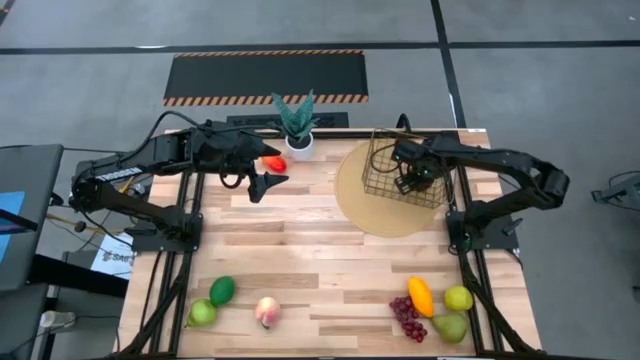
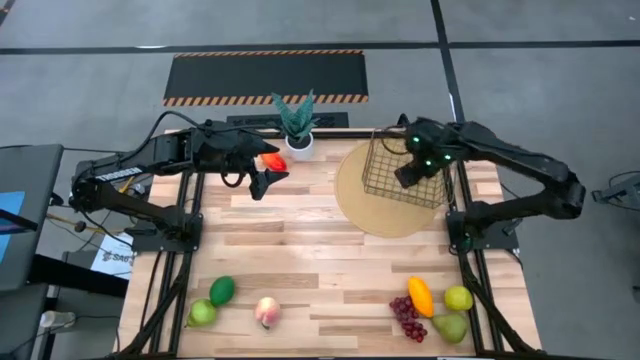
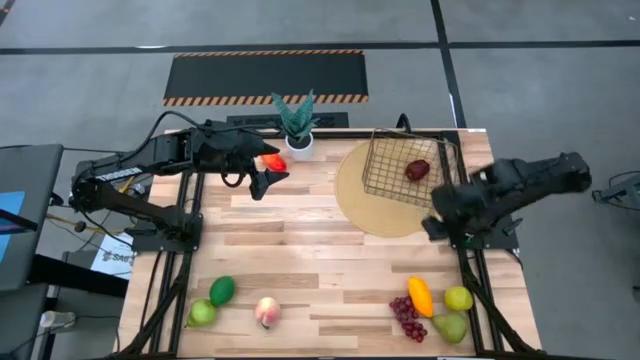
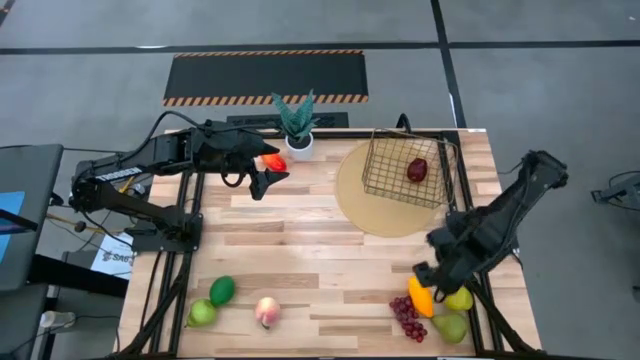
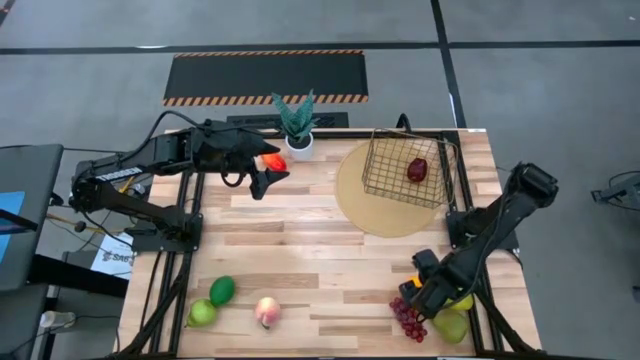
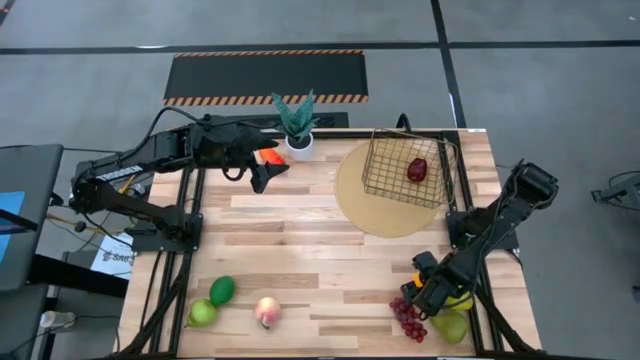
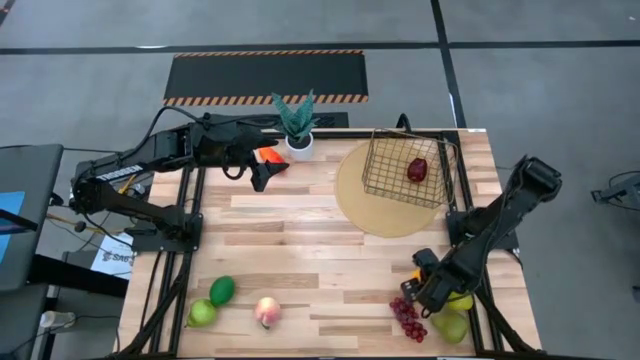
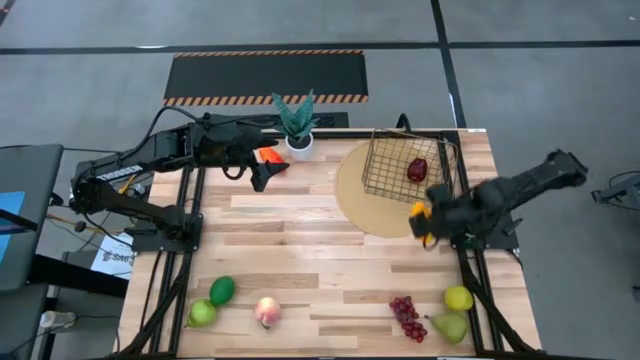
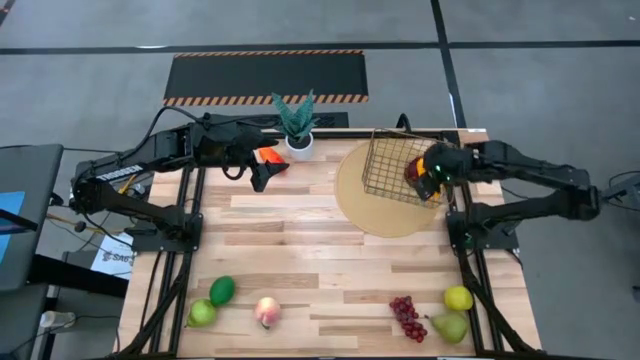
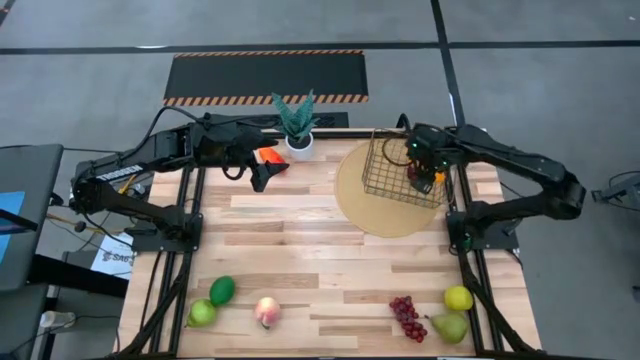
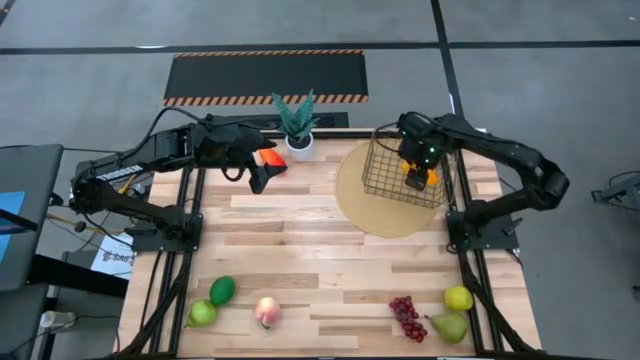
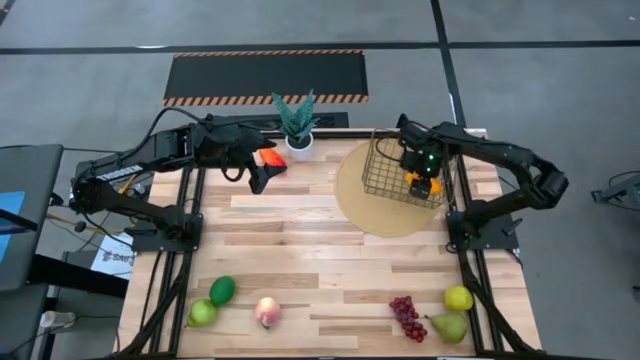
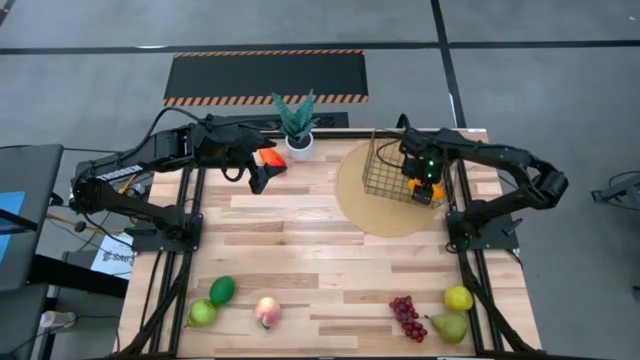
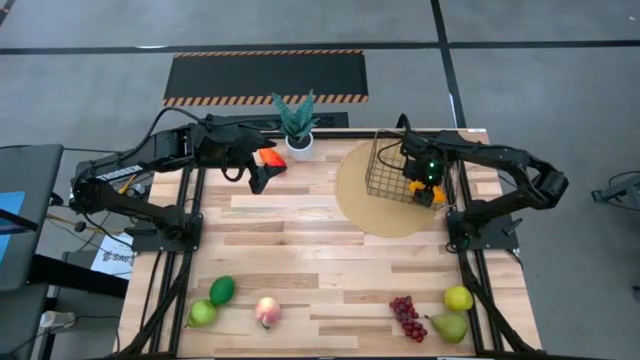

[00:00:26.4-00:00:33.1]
Task: Build produce basket
Put the yellow mango into the wire basket

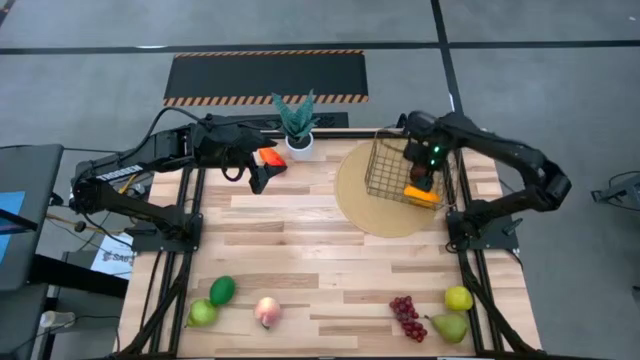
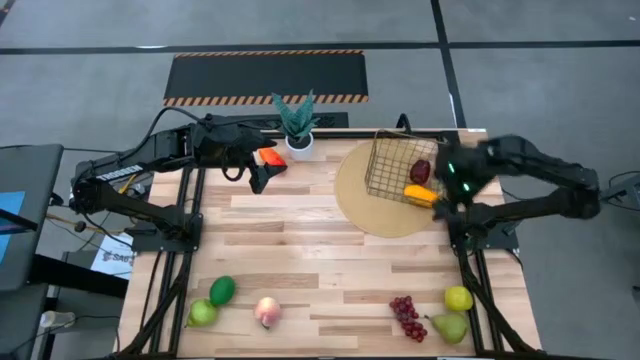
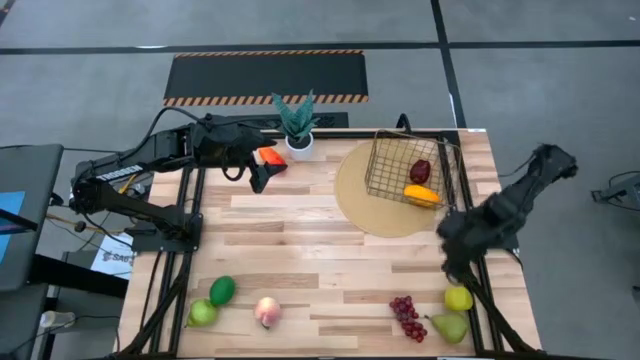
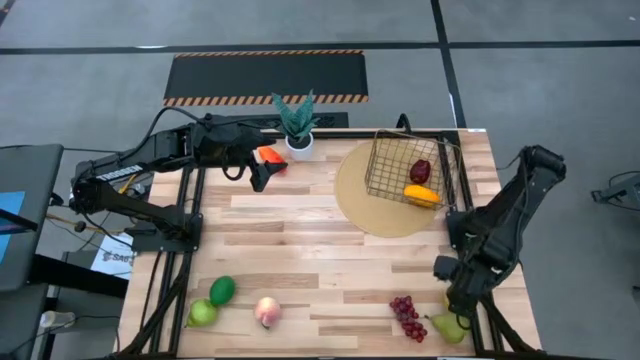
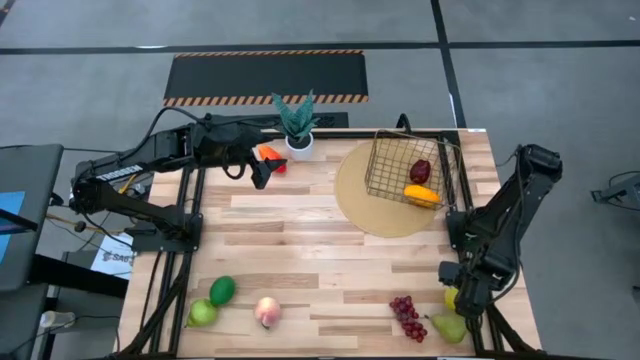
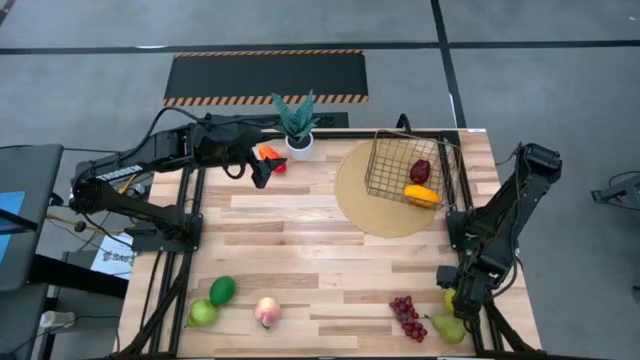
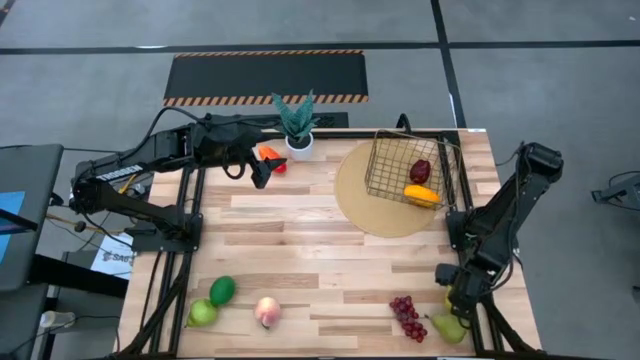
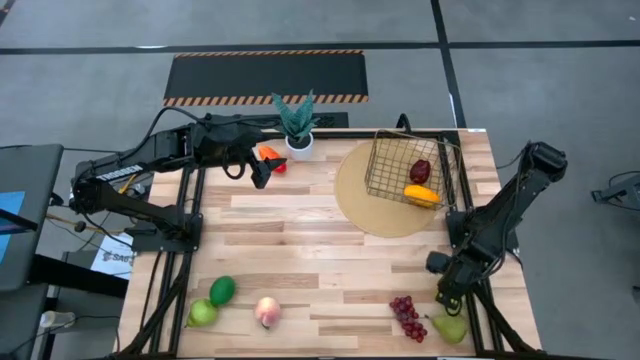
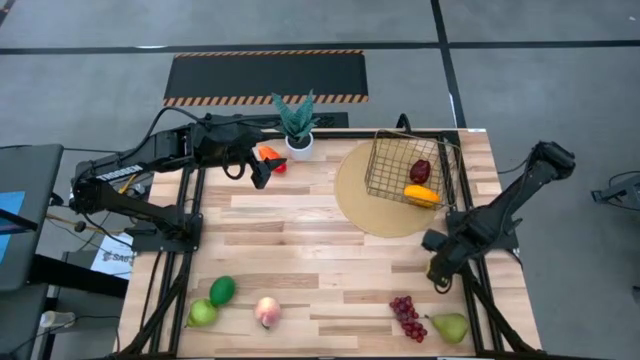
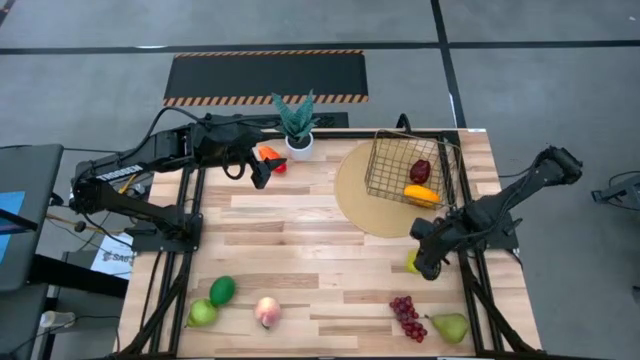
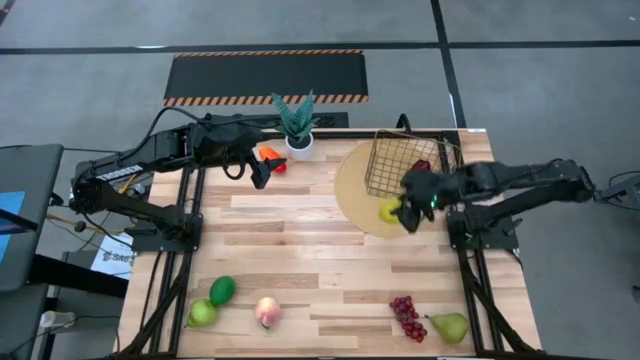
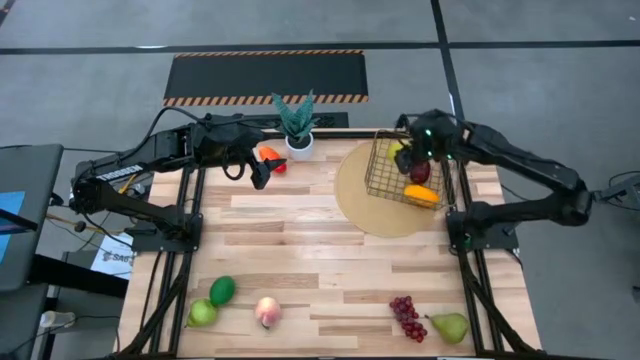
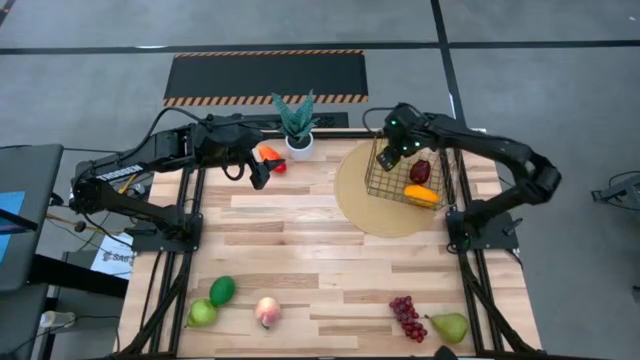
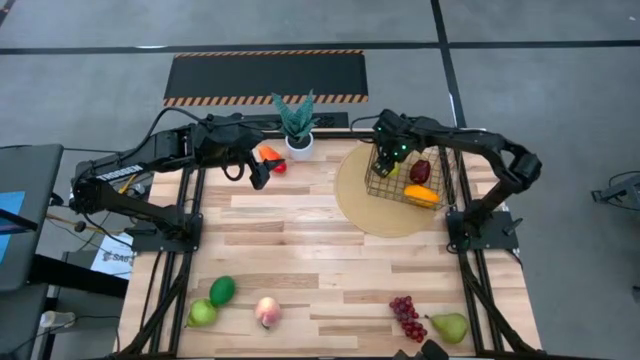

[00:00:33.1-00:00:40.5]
Put the green apple into the wire basket

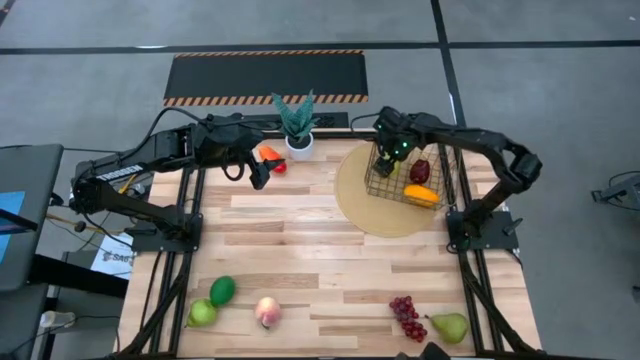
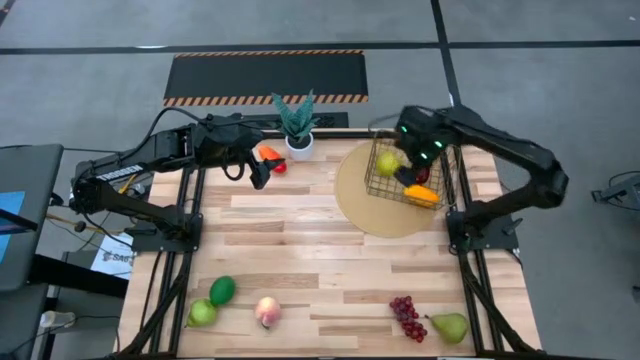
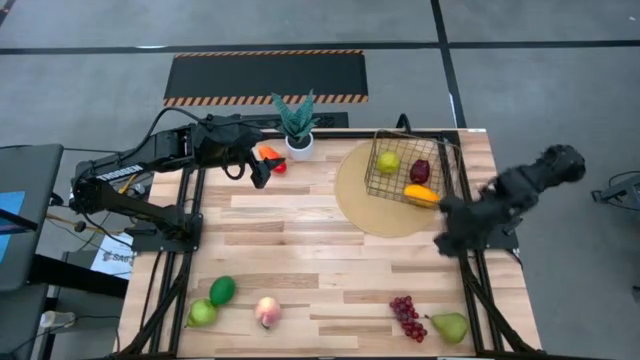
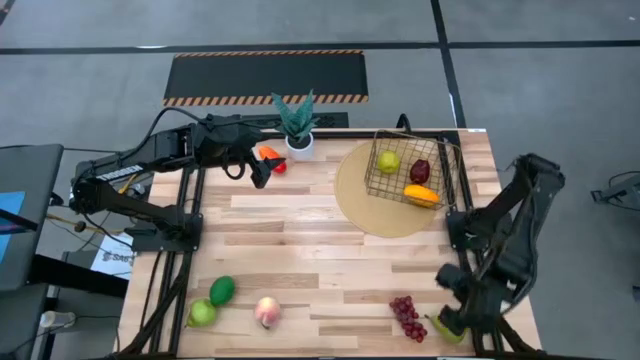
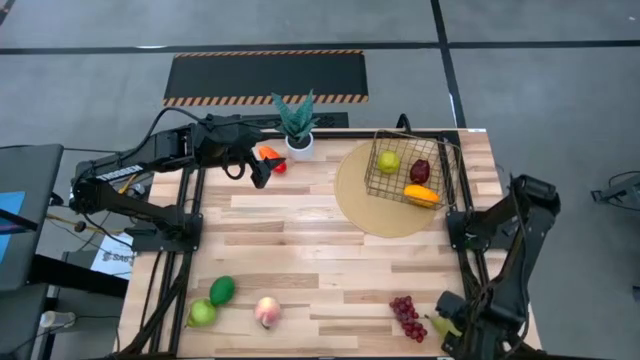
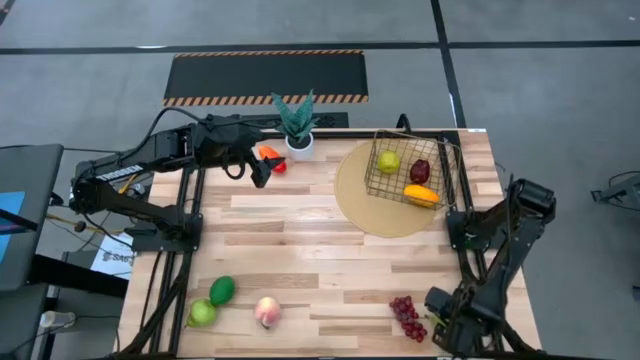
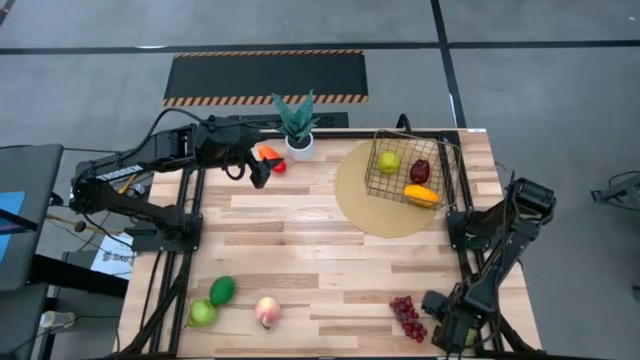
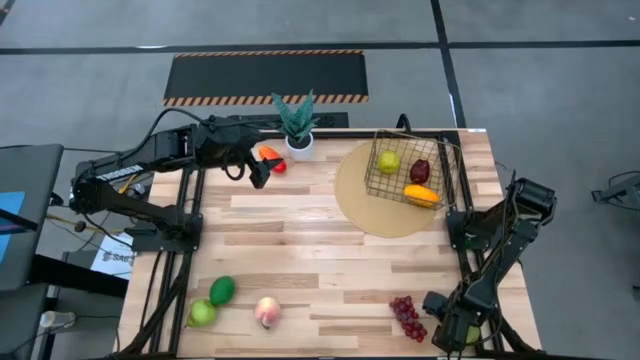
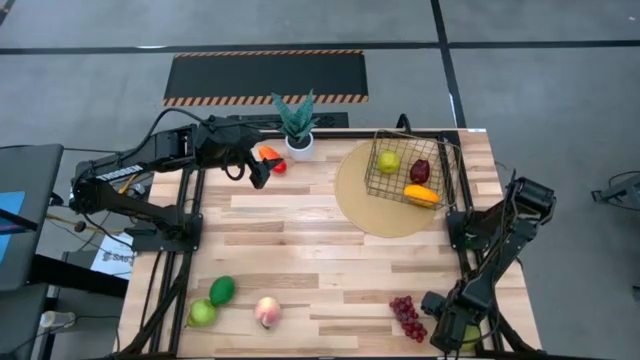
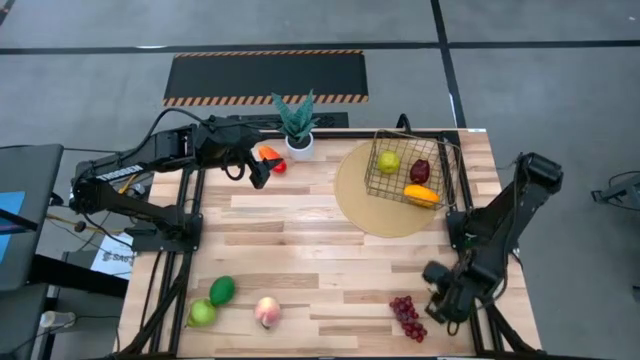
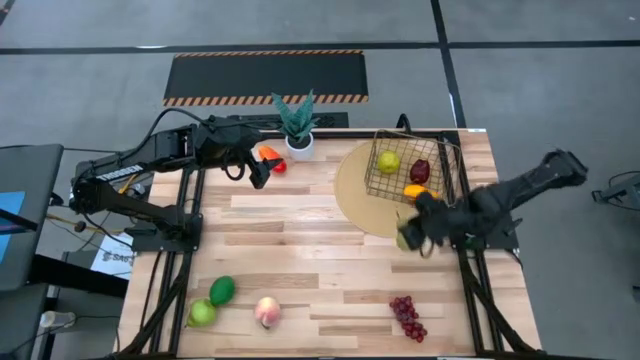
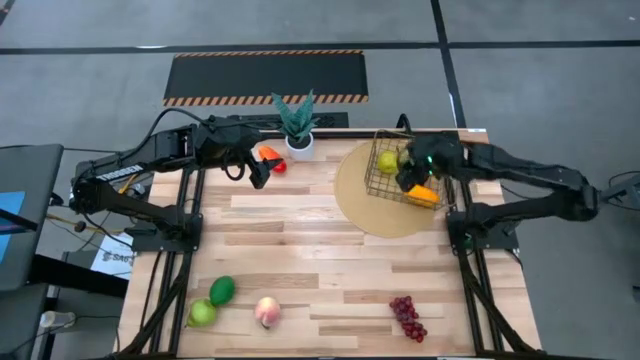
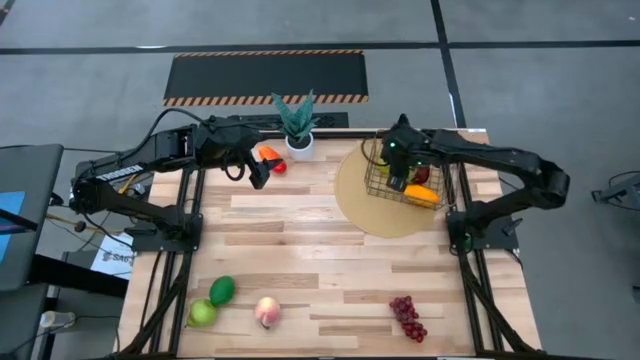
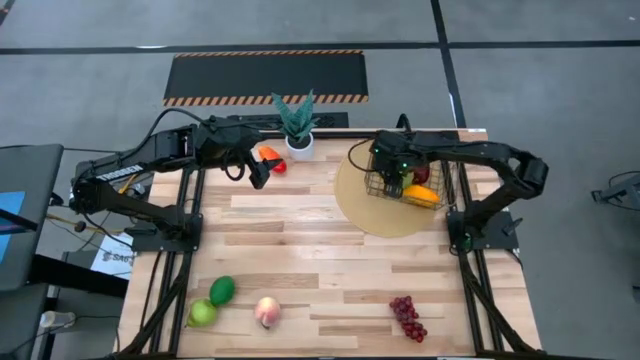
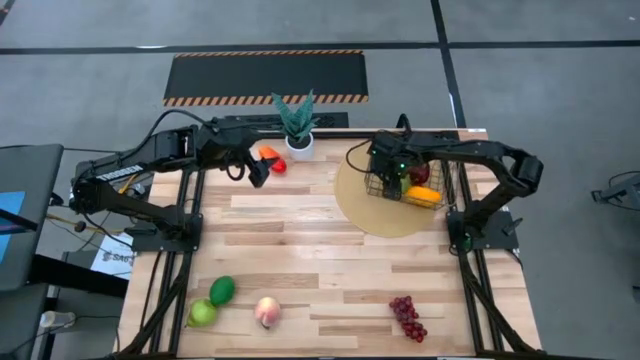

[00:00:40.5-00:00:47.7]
Put the right pear into the wire basket
